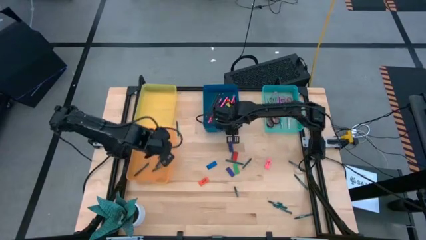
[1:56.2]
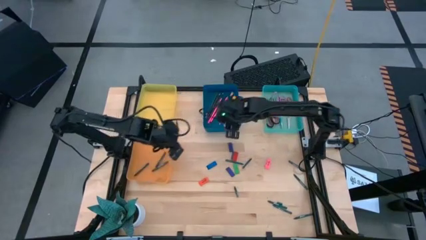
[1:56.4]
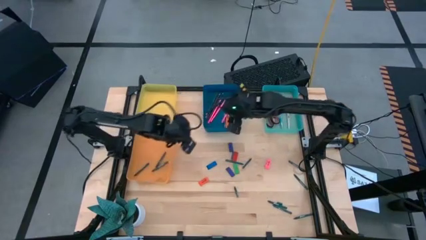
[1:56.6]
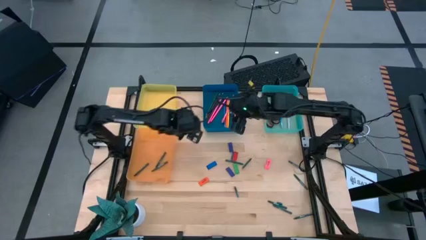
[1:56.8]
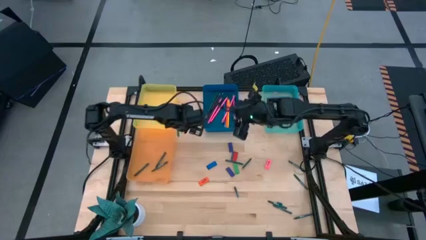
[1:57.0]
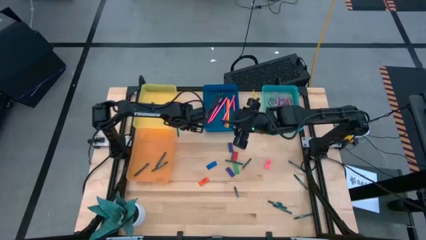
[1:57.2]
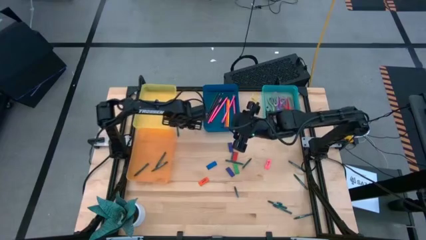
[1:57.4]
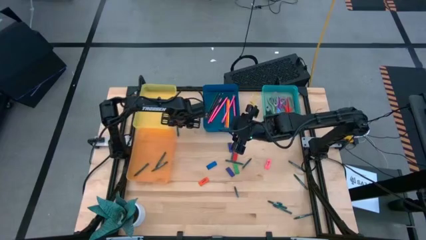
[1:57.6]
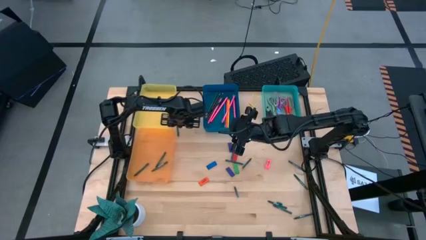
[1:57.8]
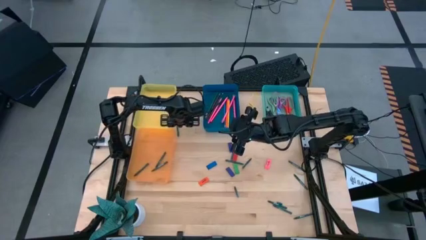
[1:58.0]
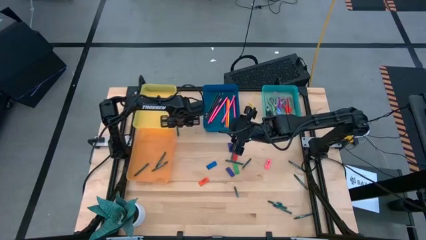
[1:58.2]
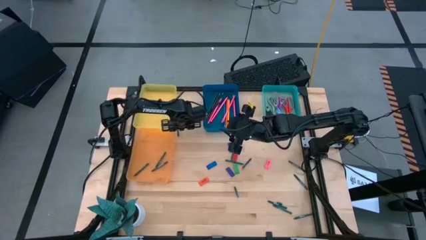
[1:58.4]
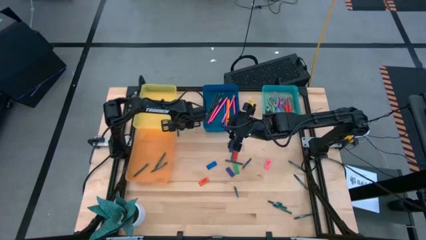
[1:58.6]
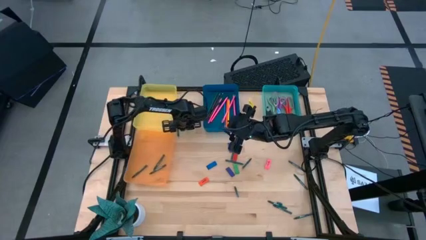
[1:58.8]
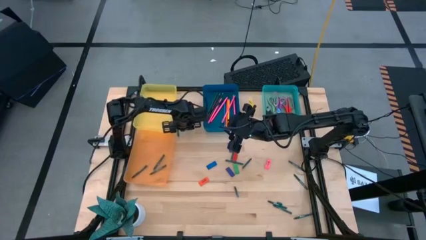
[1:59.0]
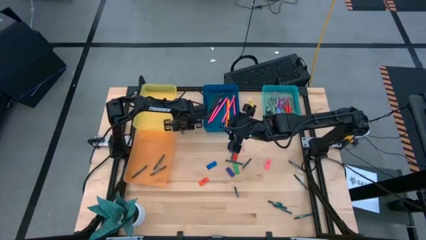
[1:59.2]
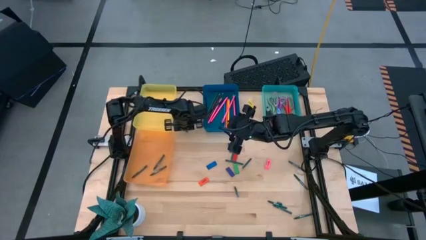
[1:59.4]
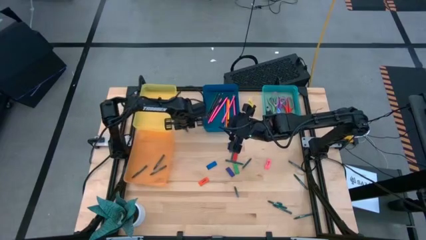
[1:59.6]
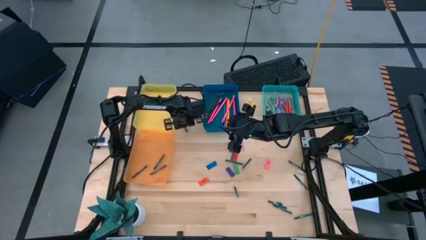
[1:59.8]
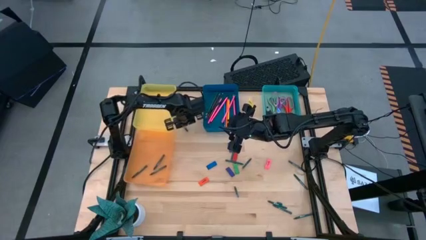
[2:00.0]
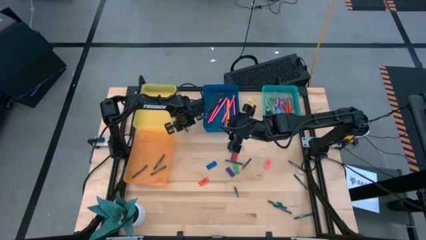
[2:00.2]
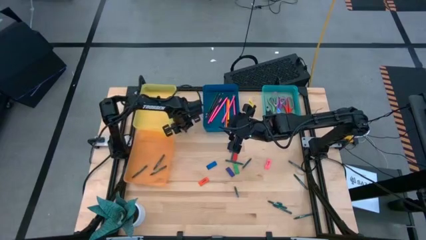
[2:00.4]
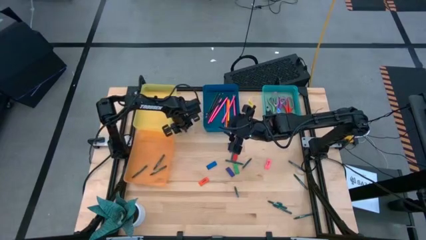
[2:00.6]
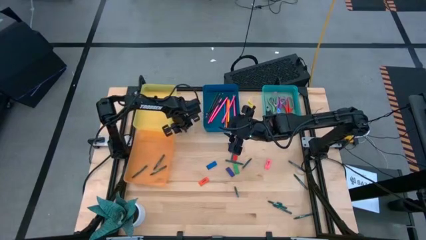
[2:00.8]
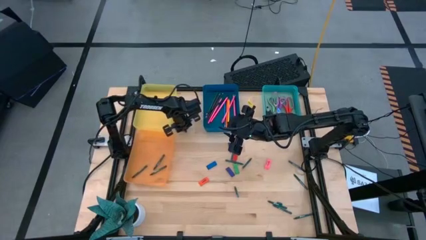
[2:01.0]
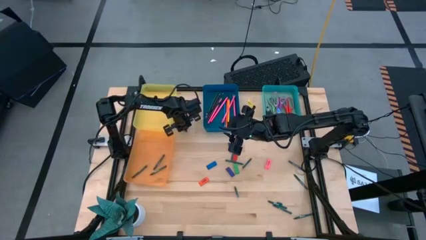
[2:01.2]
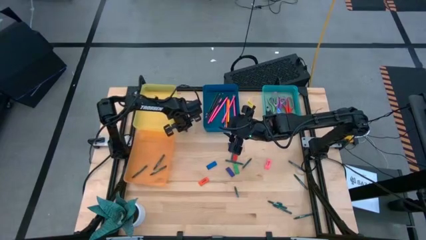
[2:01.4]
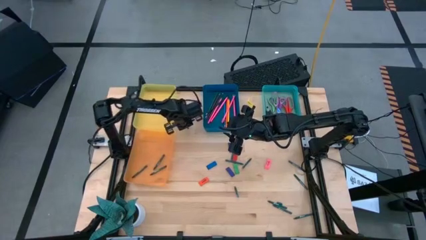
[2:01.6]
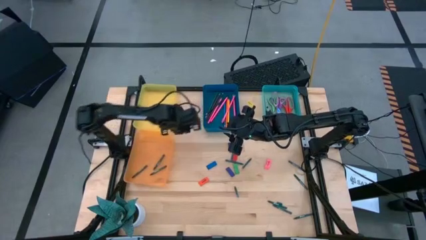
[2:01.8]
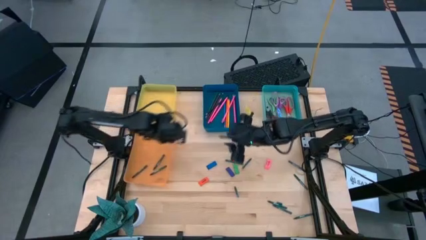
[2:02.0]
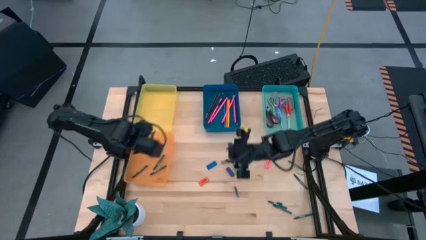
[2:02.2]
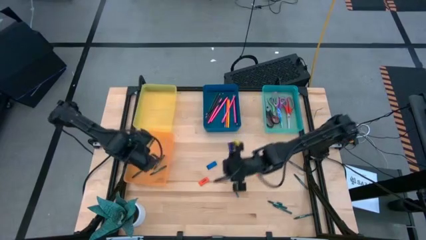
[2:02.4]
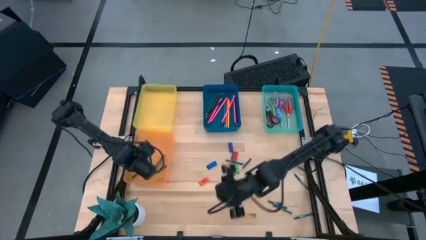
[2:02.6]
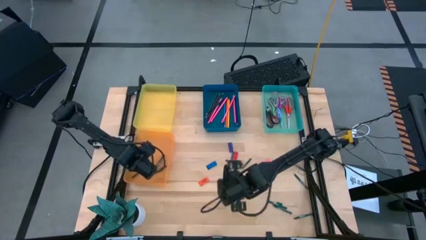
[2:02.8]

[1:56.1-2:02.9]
Task: Sort crayons/erasers/pens/pencils in bins
Put the green crayon into the orange bin

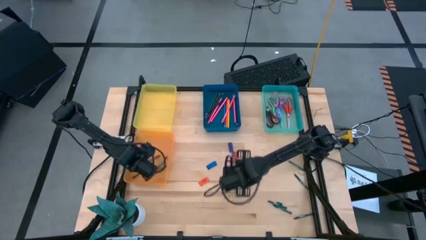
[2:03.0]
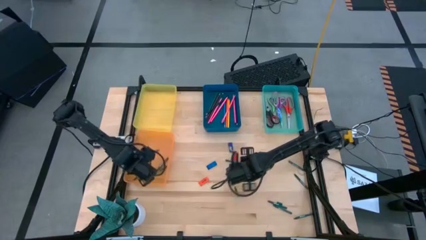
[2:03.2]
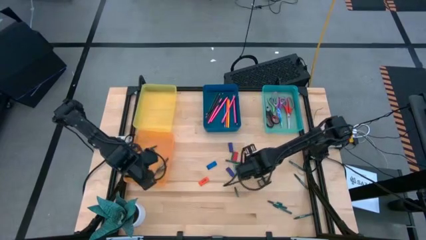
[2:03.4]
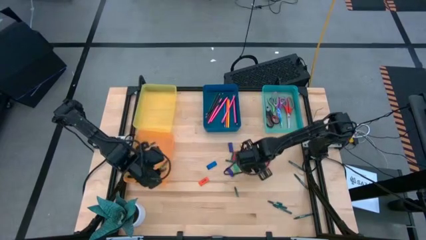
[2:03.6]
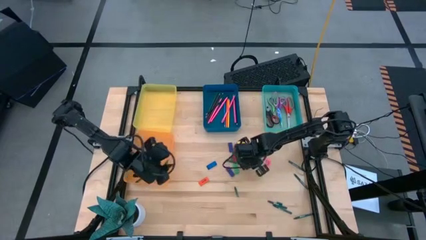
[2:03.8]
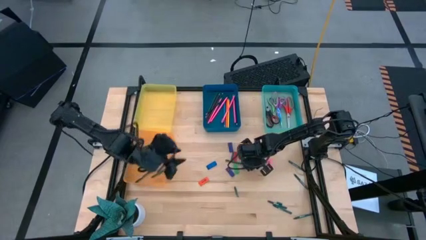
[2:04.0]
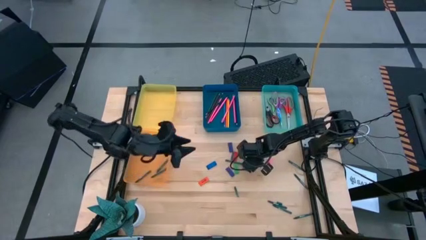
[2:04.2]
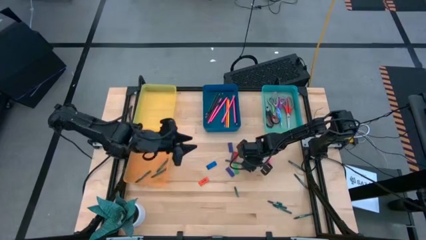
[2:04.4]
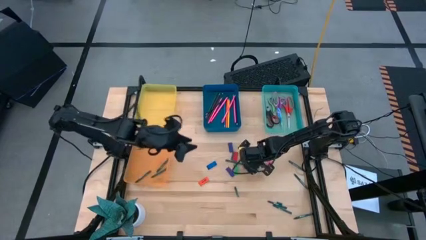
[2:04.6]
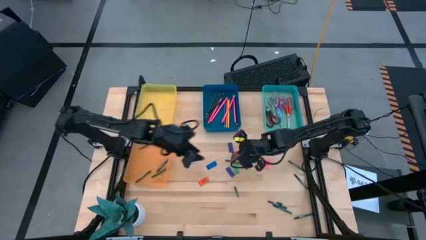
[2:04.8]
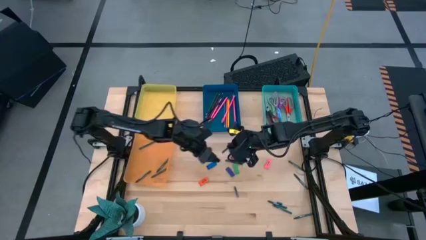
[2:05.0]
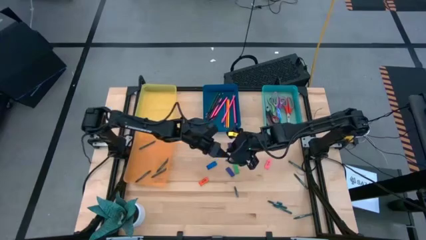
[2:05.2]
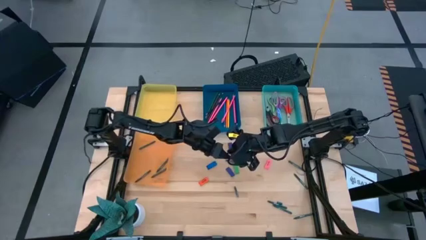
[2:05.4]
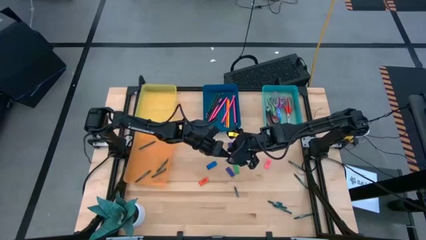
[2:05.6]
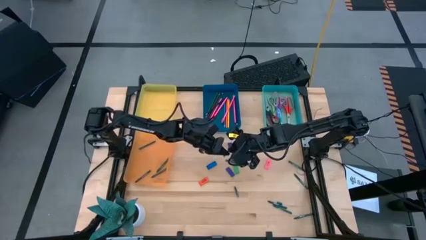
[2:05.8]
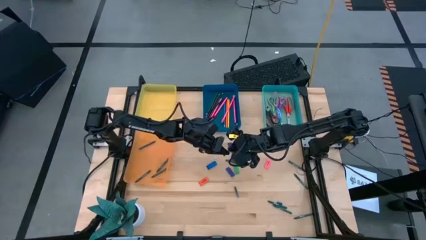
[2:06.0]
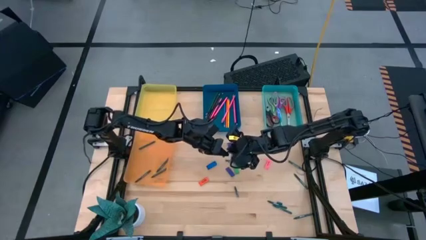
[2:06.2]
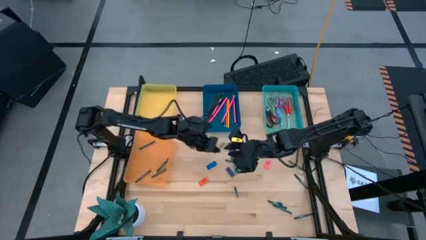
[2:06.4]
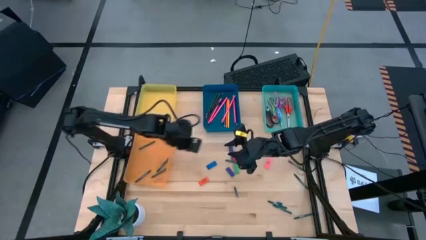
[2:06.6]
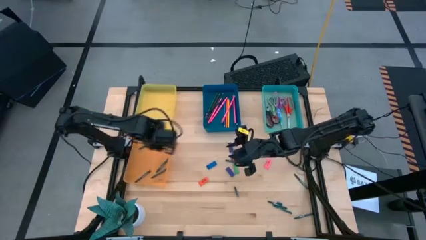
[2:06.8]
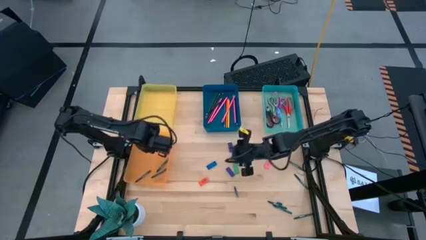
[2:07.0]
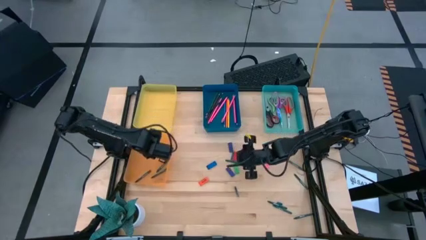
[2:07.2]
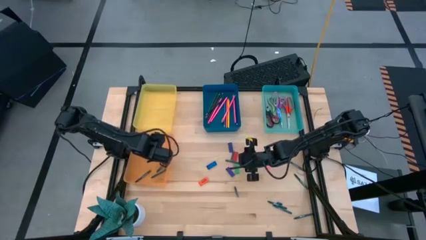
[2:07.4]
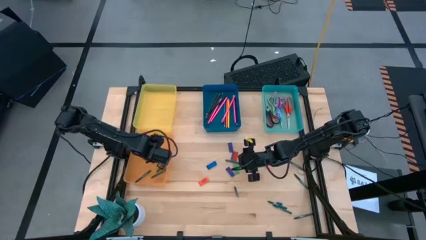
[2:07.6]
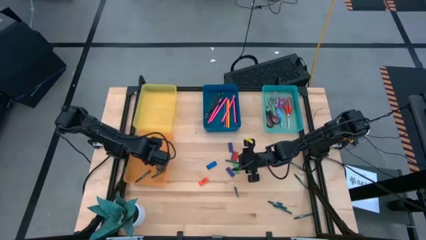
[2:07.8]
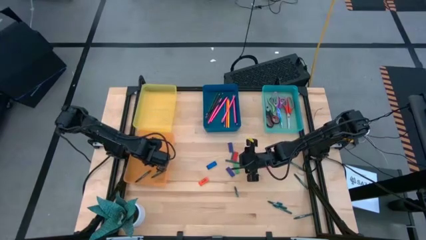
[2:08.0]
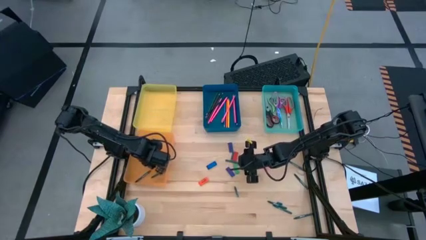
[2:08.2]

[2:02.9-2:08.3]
Put the green crayon into the orange bin

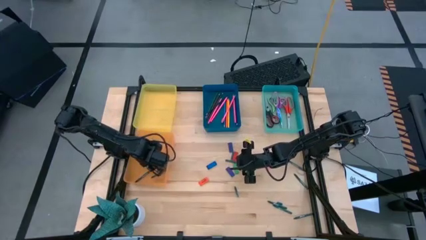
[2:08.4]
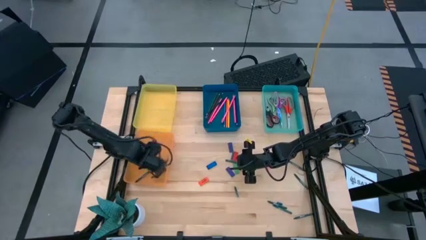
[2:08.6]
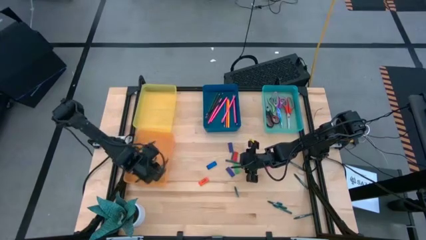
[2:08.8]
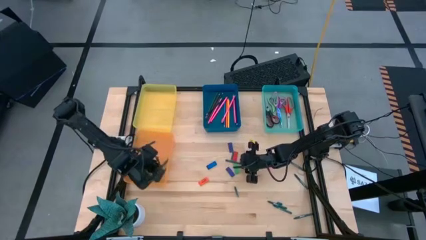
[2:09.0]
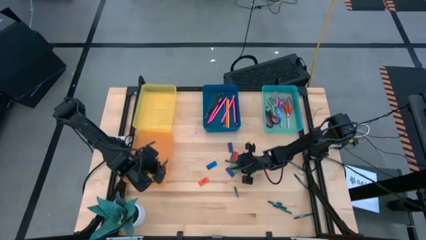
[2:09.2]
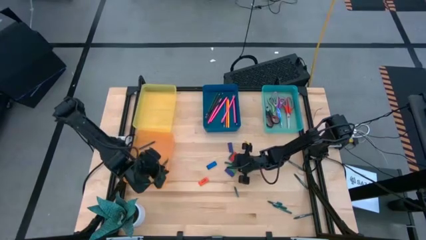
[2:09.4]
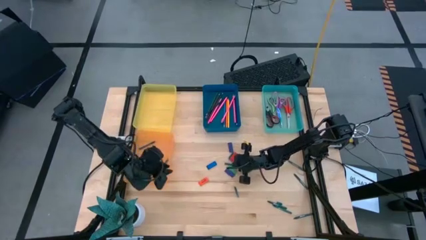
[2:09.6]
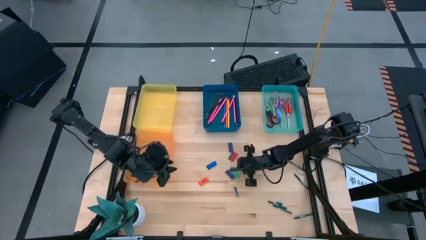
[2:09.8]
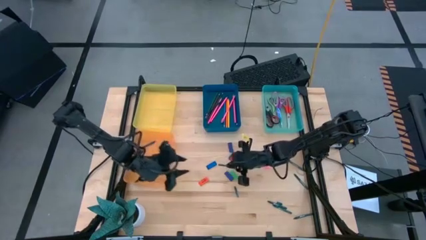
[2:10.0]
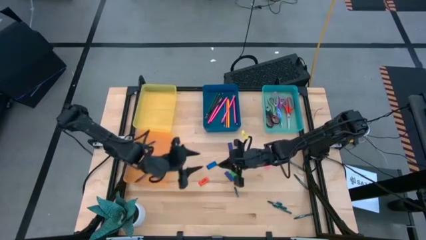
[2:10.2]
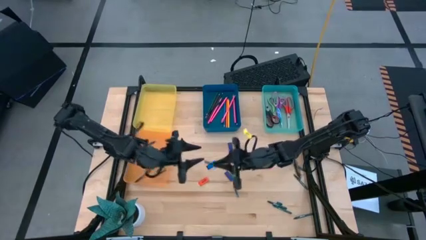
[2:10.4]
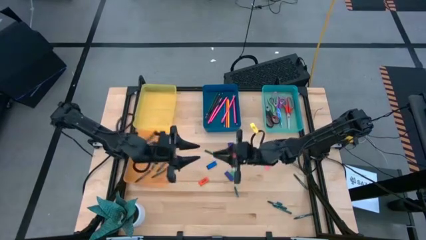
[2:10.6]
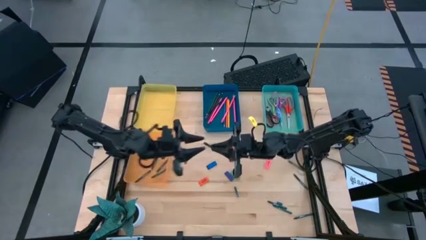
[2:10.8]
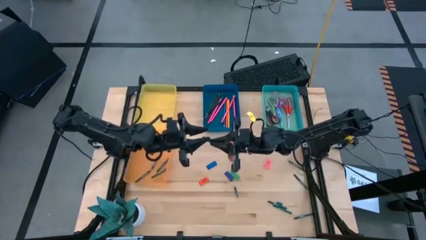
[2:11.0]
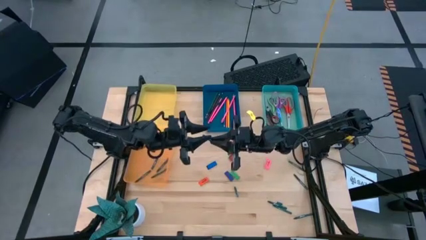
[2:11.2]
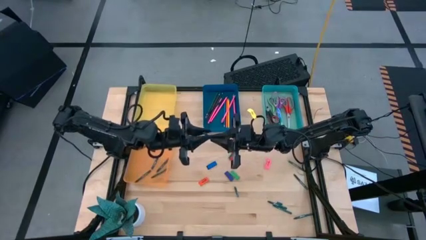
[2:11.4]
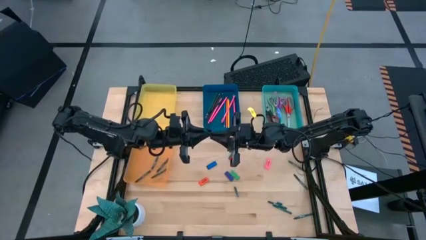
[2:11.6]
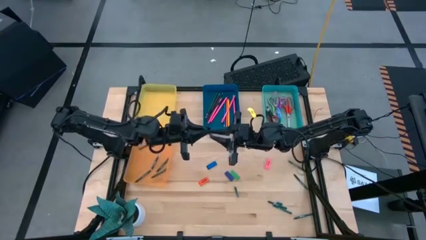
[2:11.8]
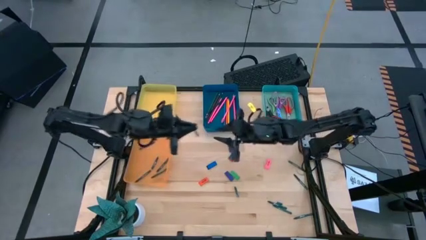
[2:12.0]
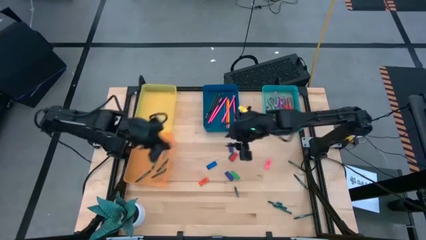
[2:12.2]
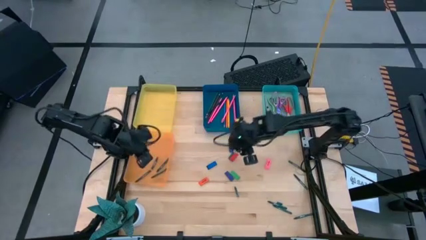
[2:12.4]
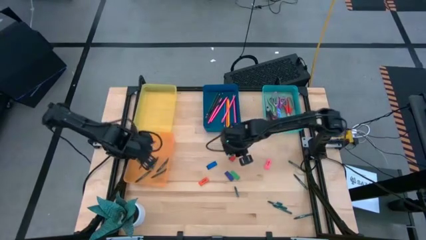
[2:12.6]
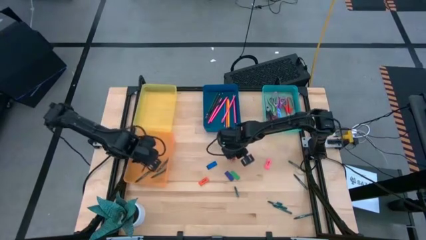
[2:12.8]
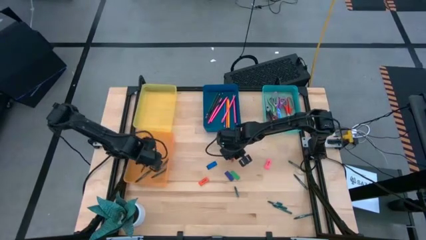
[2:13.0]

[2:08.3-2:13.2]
Put the green crayon into the orange bin
